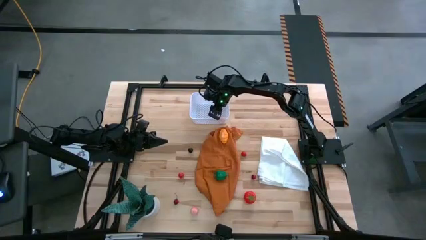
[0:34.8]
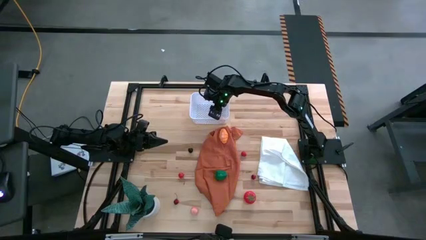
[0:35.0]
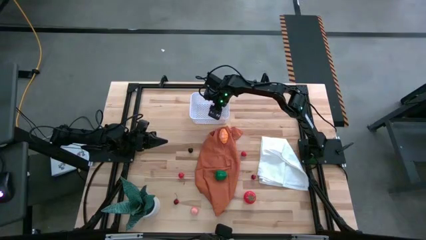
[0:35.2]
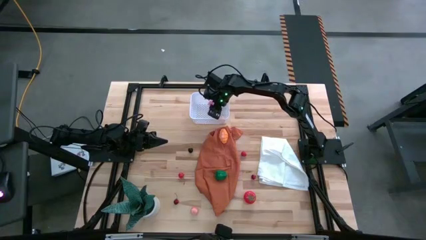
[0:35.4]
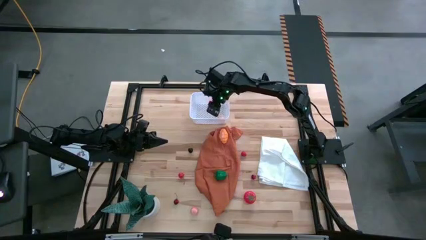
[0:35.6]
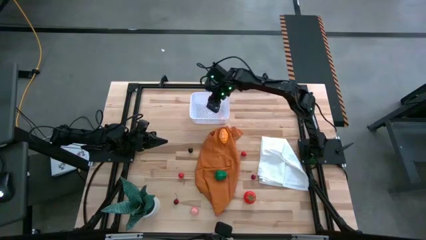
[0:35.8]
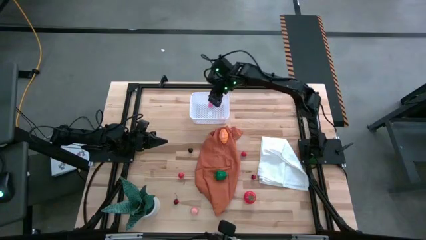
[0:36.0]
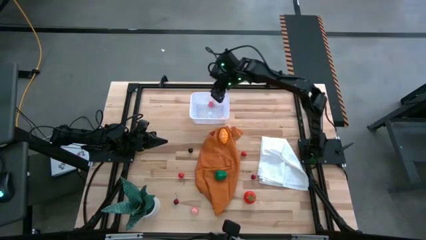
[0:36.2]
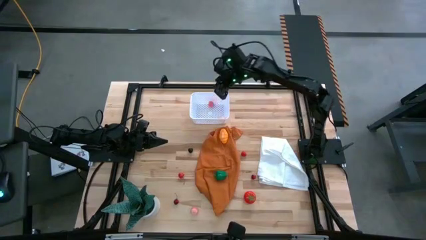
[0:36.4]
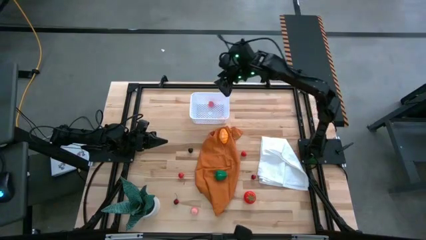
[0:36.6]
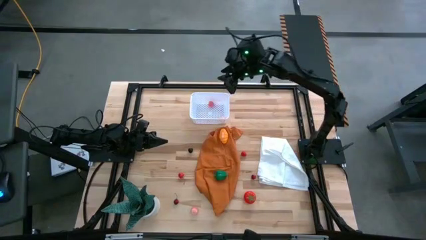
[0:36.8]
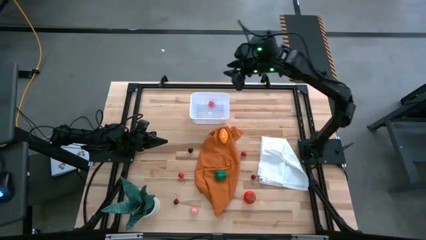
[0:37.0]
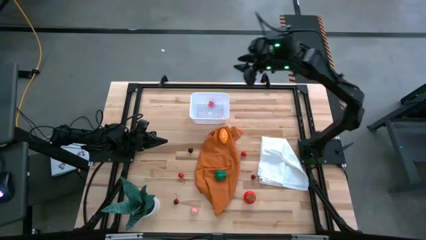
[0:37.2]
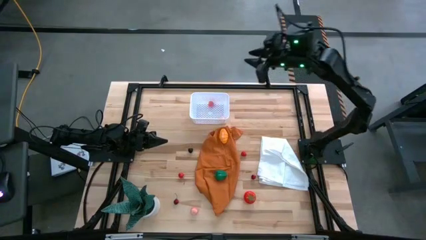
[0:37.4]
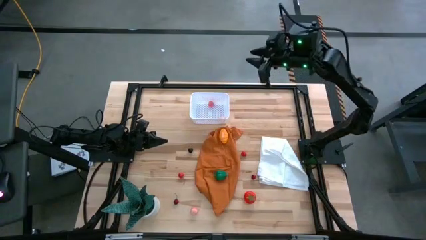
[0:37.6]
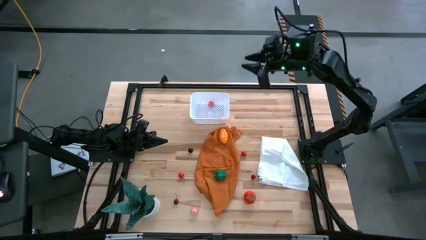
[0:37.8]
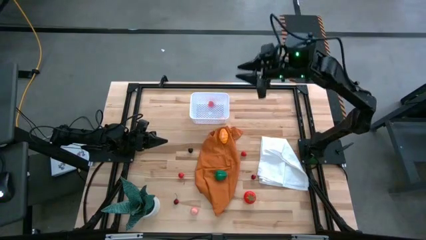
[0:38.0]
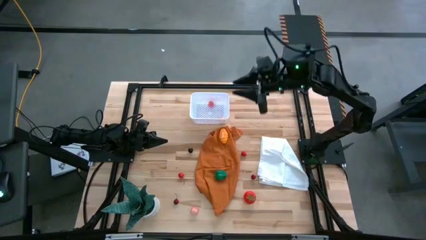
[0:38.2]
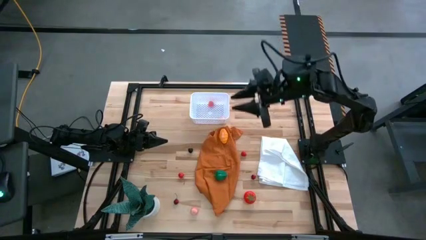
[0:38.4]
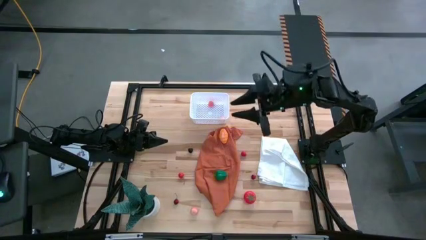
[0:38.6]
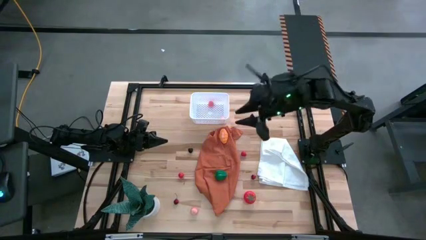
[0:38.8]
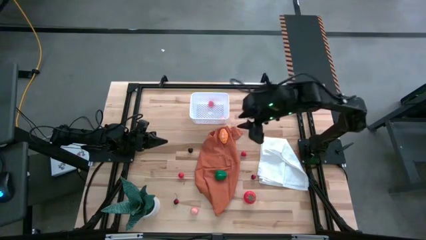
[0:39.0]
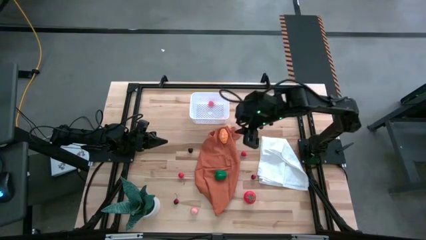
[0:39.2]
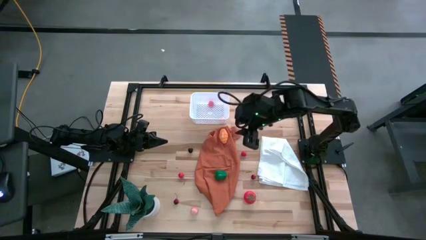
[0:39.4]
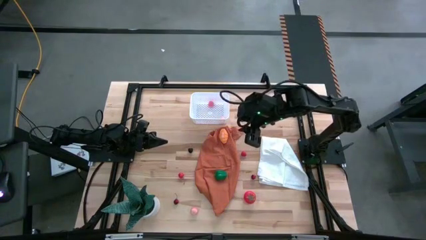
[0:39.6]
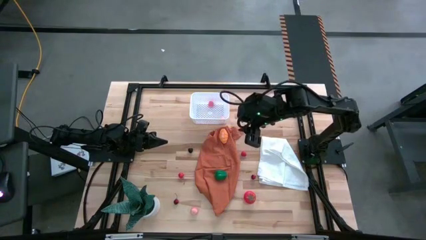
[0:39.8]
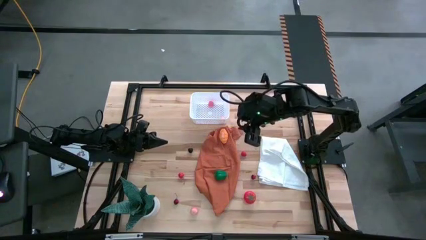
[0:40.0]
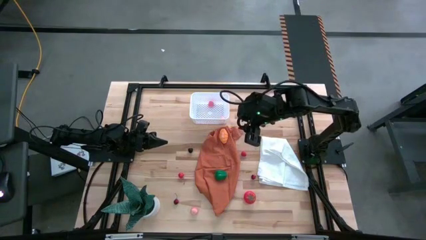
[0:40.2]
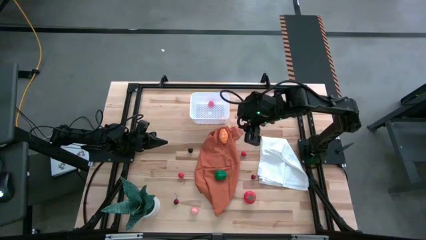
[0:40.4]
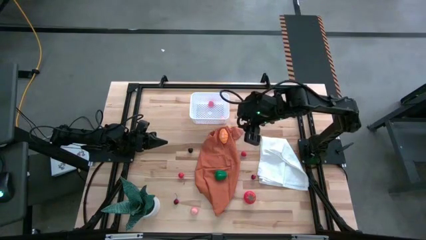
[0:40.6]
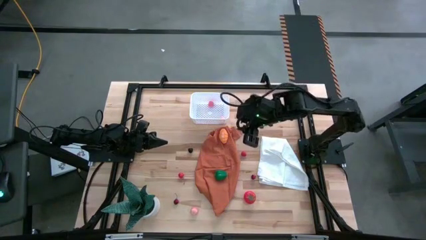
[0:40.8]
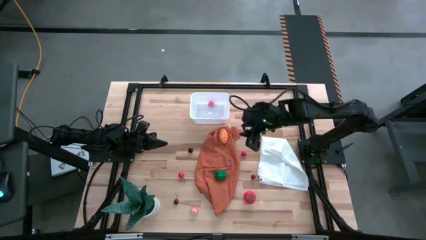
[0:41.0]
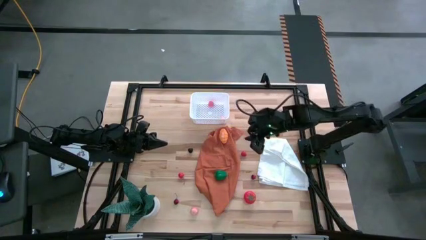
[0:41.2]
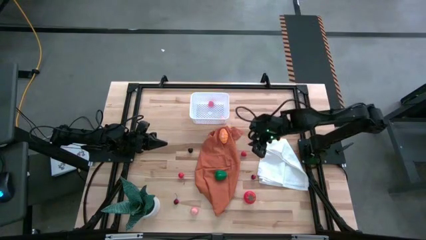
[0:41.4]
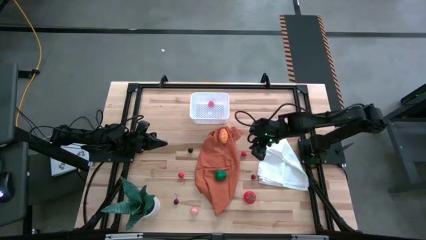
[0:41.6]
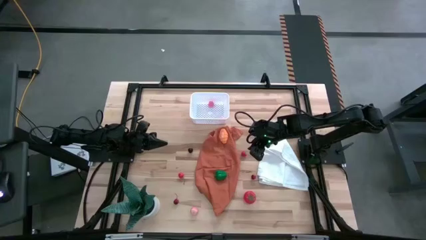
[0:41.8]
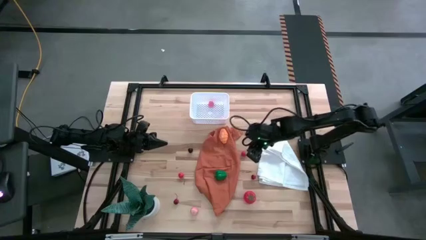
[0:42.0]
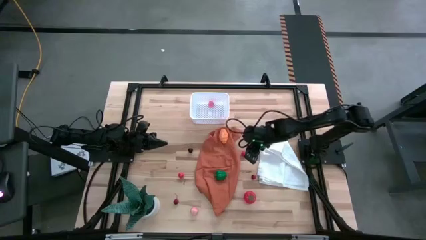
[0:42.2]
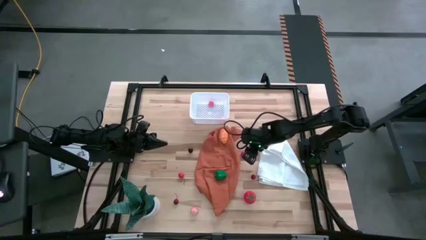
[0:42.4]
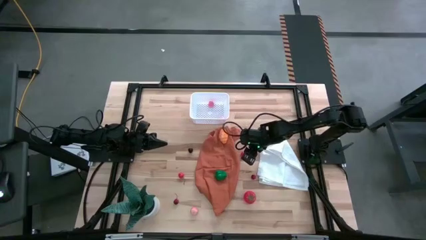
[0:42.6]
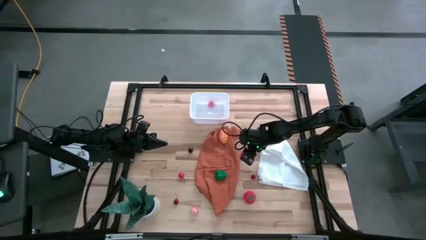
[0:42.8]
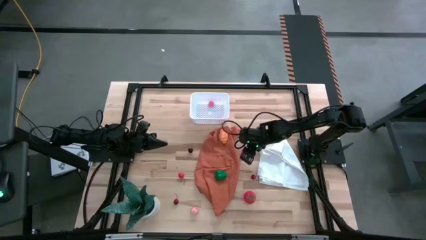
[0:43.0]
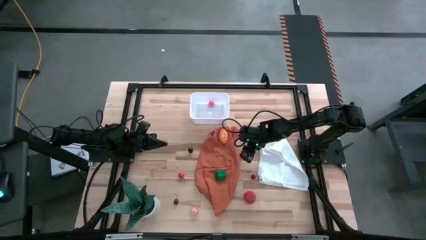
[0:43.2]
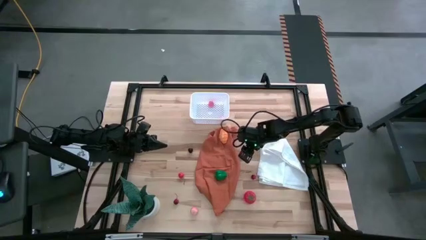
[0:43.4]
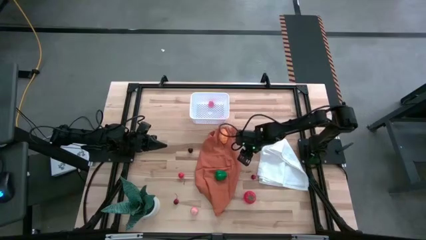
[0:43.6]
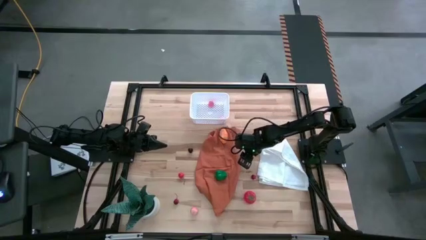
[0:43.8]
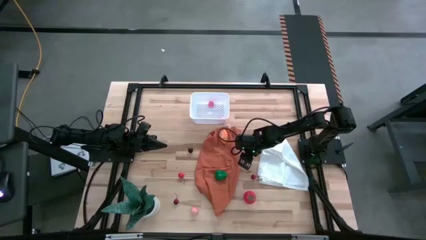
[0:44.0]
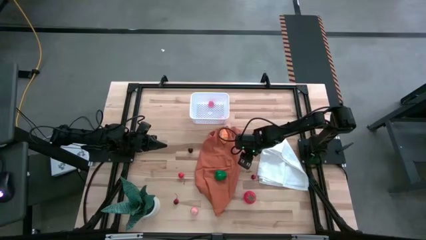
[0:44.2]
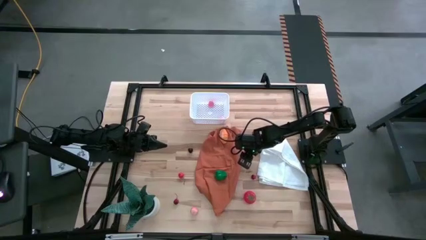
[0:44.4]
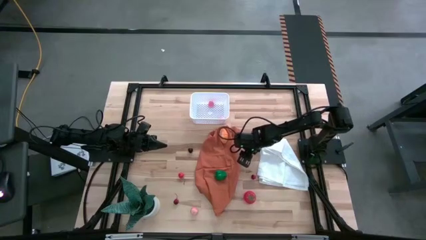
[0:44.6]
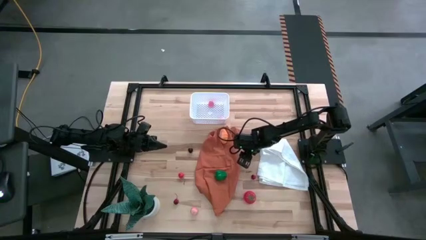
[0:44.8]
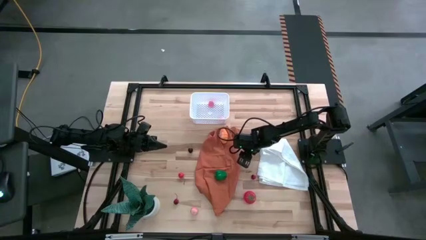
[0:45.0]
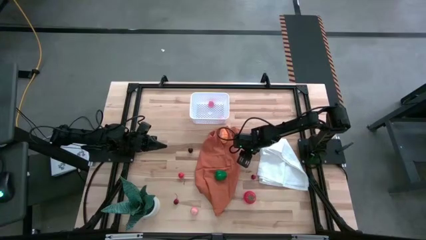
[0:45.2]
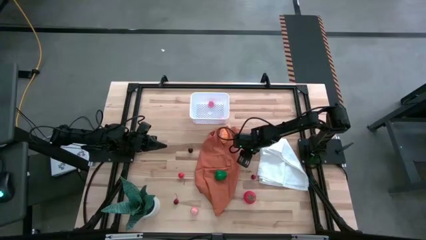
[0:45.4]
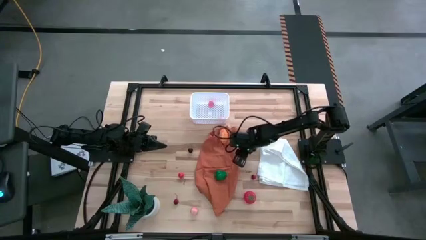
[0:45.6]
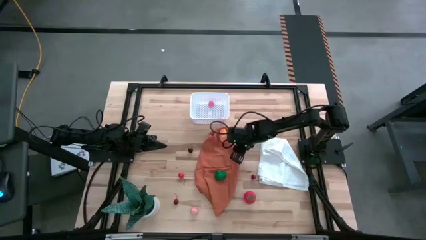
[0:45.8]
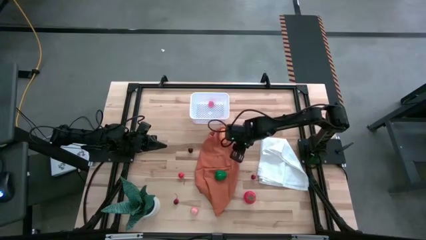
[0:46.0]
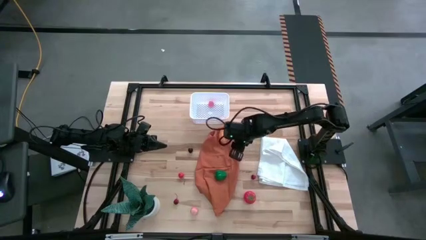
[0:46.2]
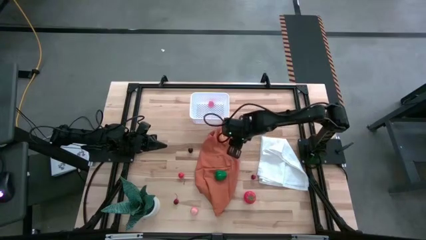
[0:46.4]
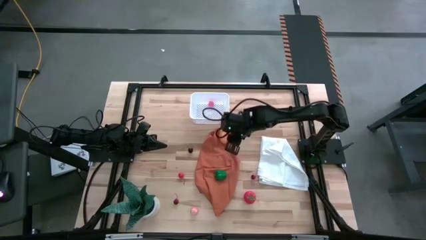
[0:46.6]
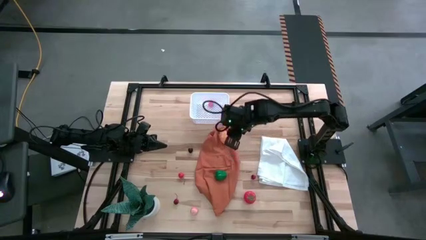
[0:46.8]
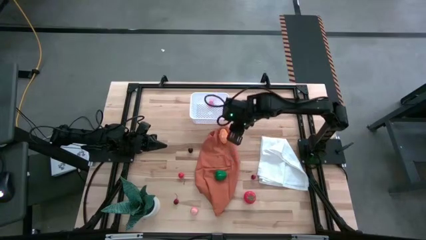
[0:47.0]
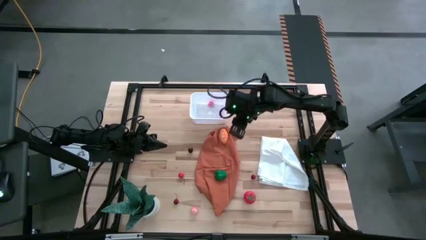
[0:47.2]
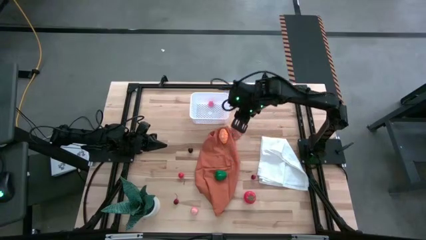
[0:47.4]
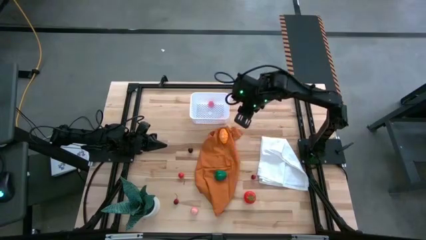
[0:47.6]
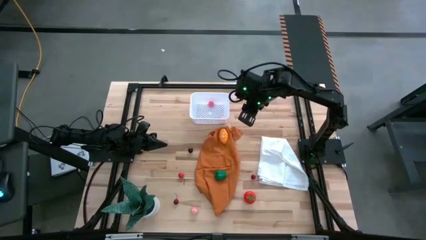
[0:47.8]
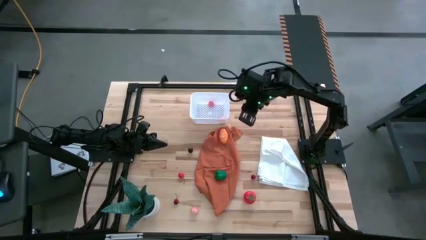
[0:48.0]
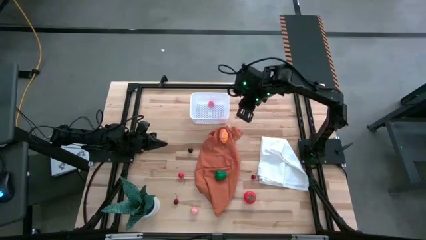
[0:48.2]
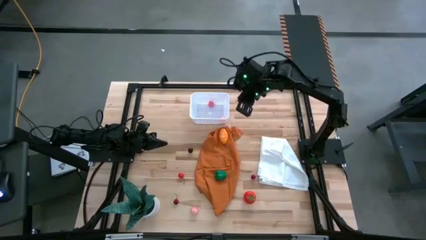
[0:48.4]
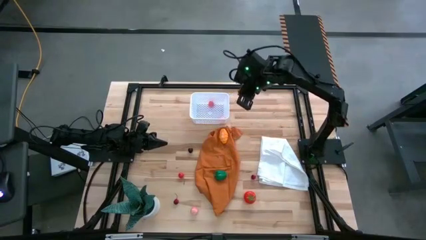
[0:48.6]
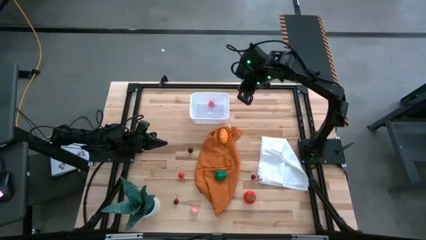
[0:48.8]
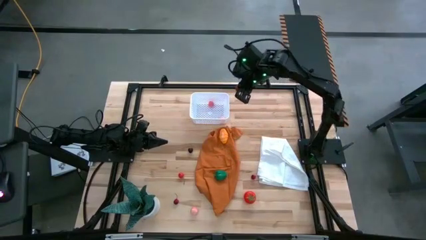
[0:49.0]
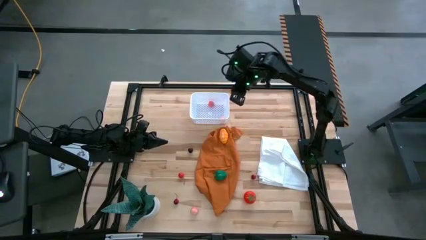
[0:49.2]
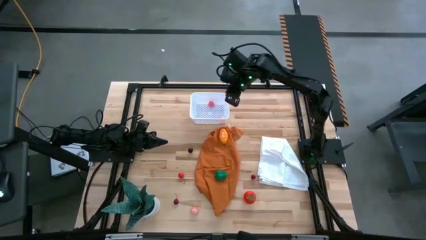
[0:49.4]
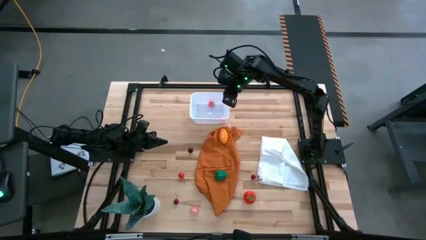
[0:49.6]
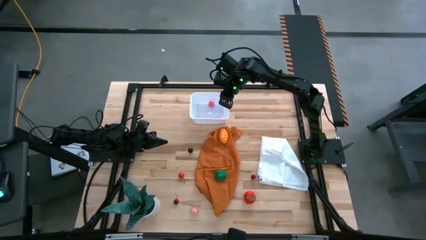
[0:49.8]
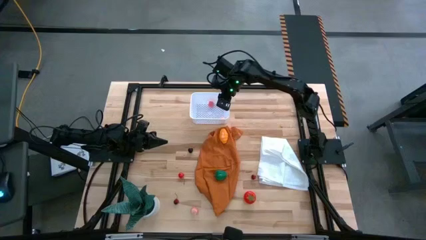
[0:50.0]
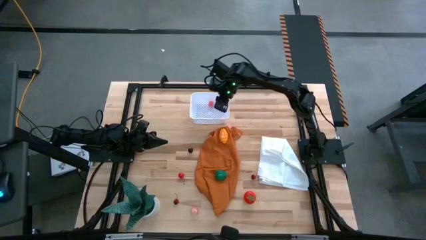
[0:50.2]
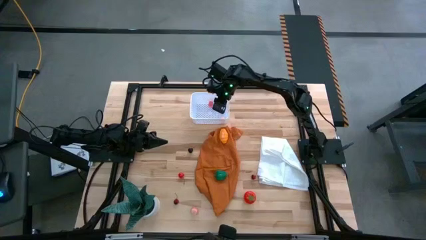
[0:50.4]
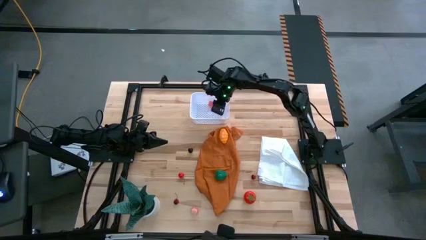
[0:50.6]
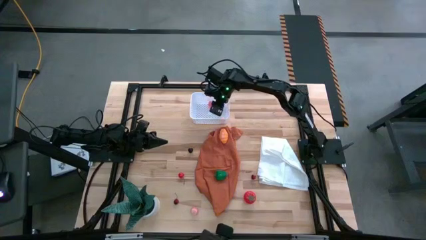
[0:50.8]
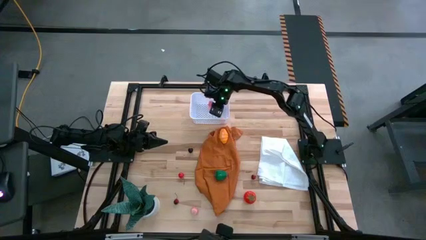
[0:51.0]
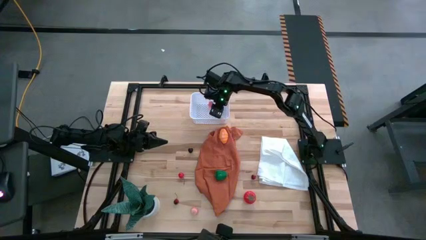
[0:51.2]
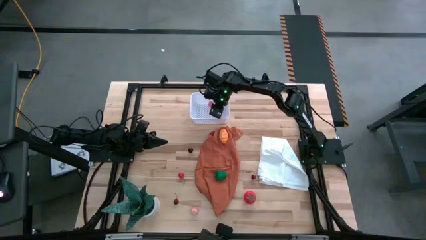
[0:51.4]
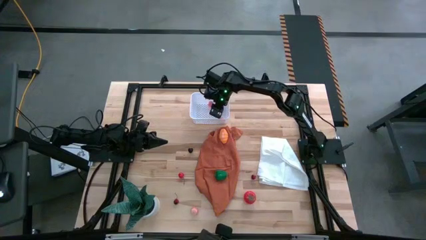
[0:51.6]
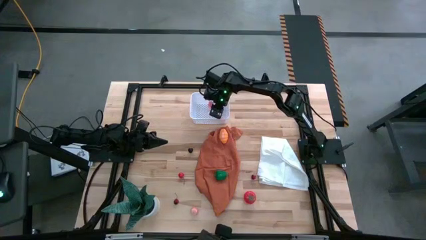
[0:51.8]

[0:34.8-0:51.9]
Task: Pick and placing Produce into tupperware
Put the red raspberry into the white basket
